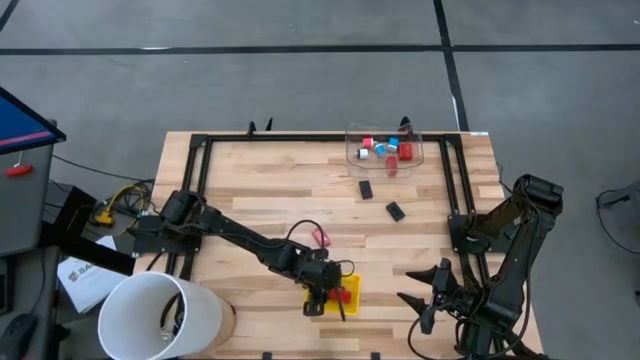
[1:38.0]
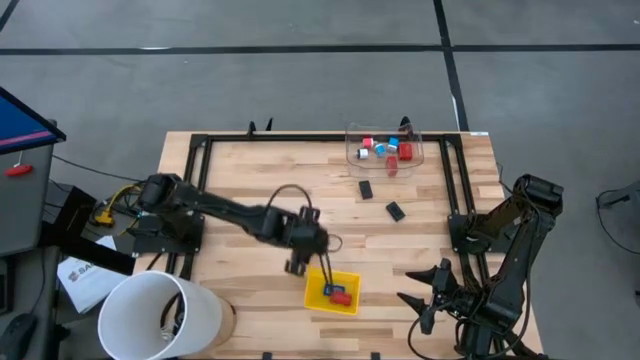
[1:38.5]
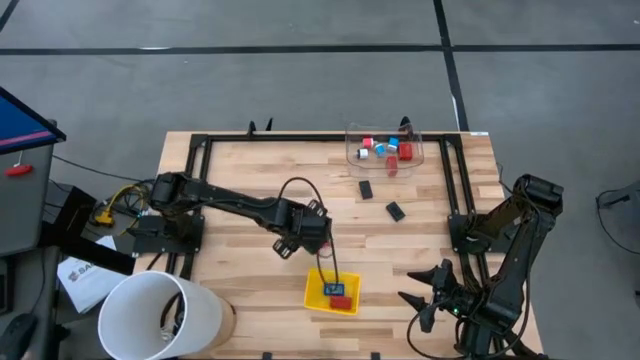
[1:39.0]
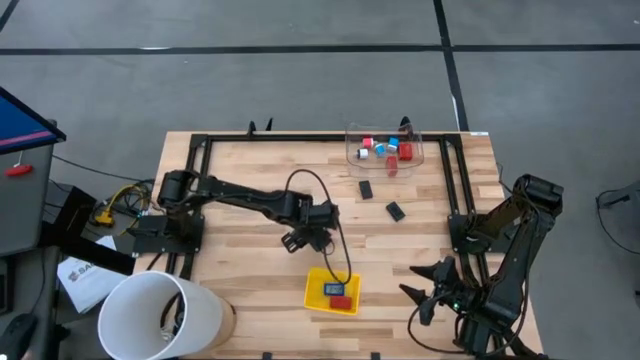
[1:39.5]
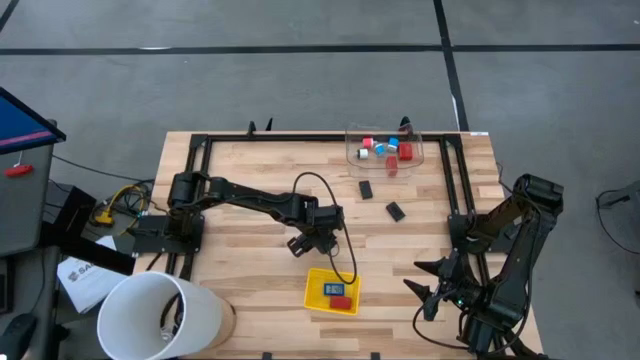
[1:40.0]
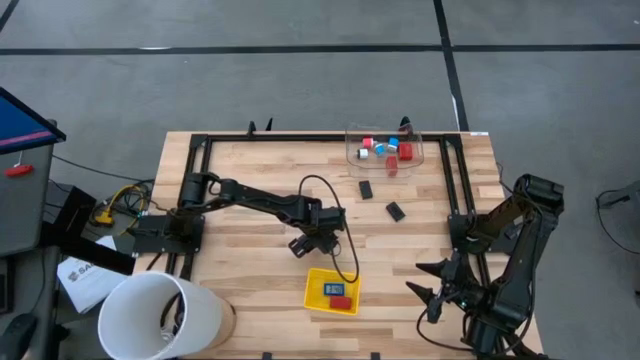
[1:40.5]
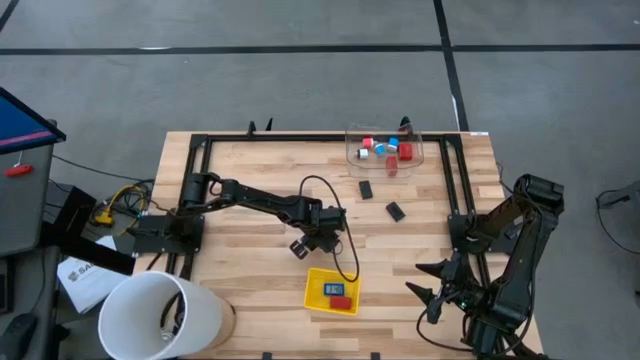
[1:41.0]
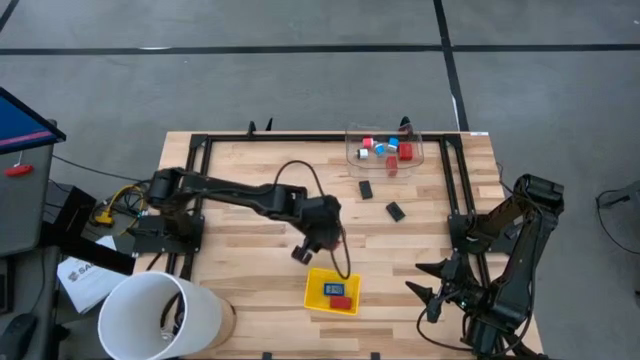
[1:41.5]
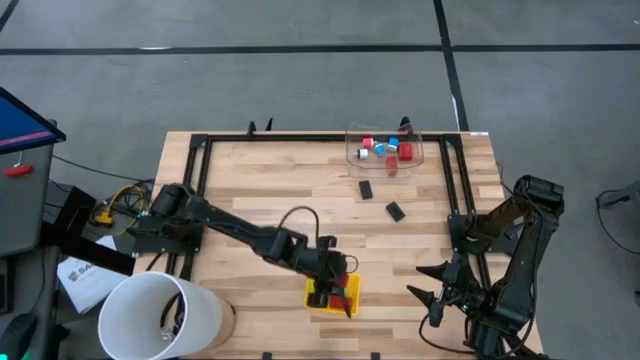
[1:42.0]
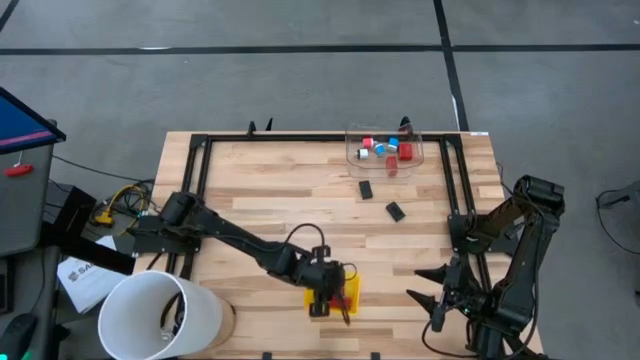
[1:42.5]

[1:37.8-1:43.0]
Task: Pick & Place Office items
Put the red digital clock into the yellow bin

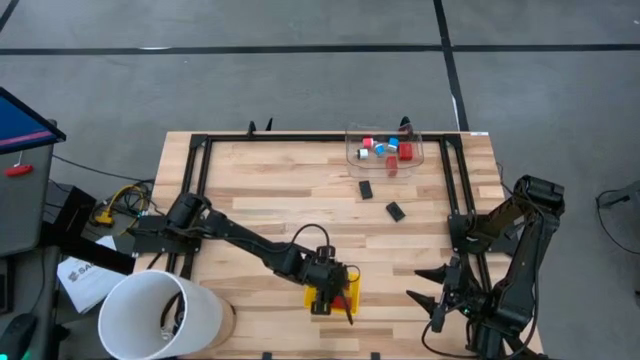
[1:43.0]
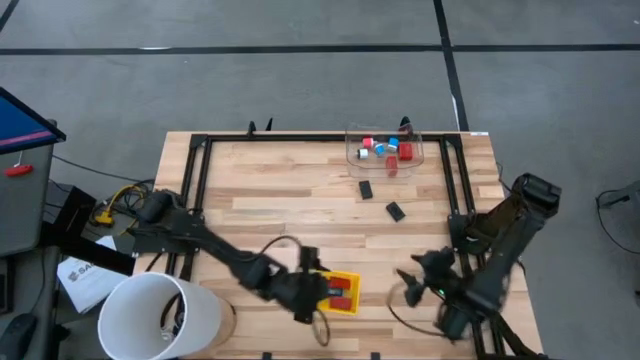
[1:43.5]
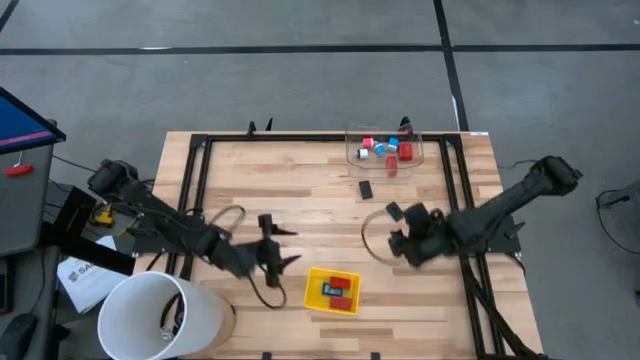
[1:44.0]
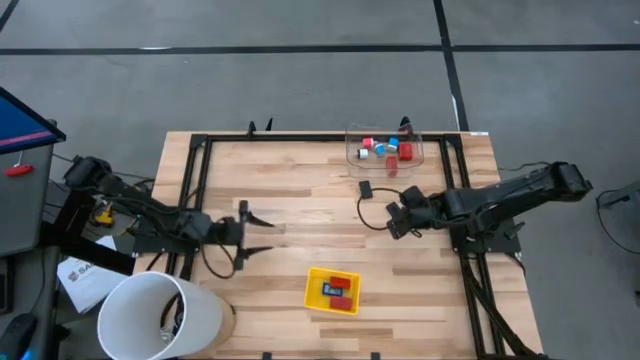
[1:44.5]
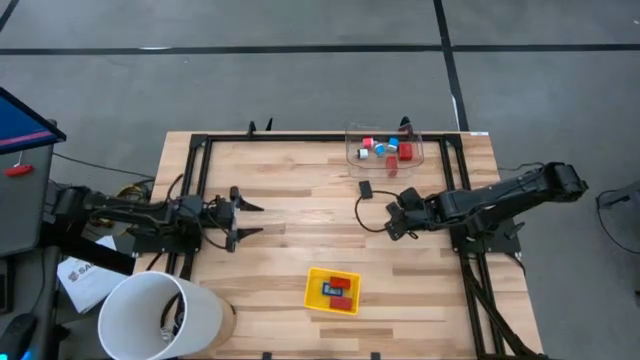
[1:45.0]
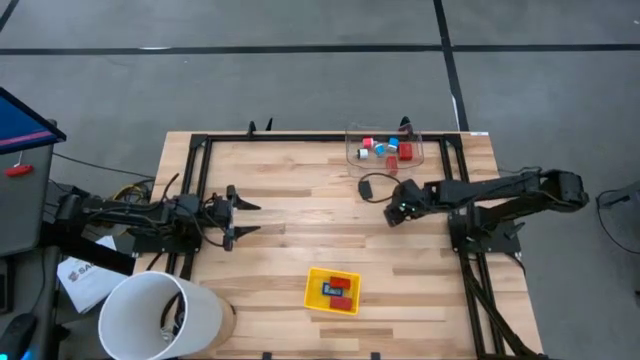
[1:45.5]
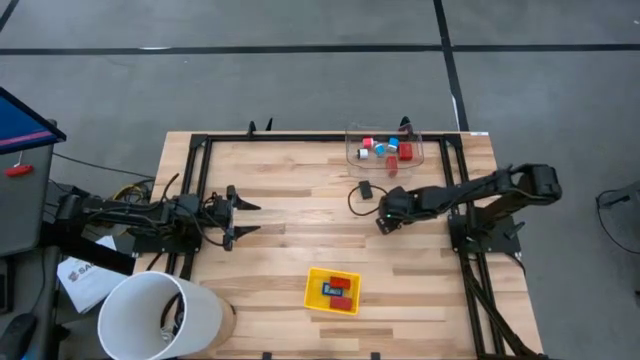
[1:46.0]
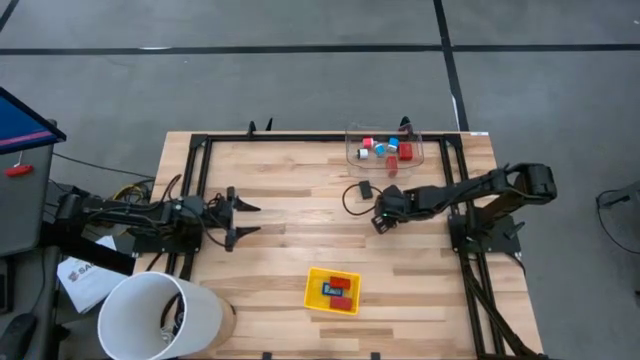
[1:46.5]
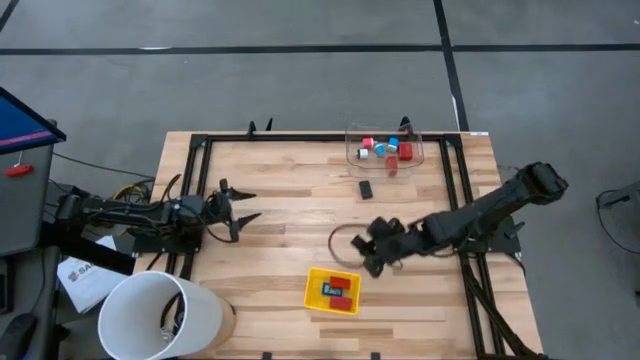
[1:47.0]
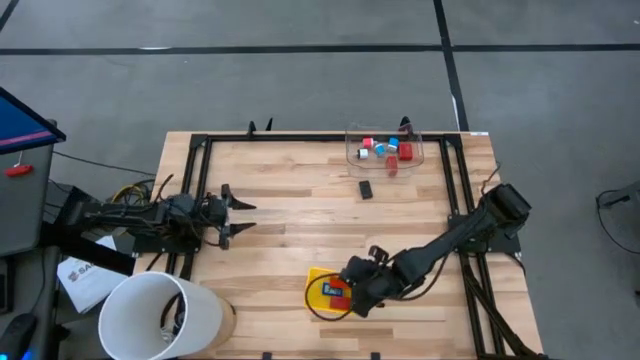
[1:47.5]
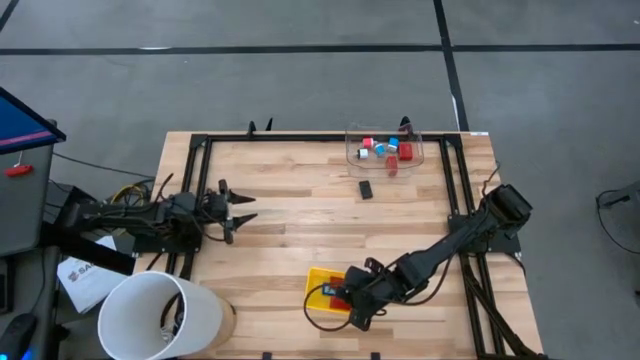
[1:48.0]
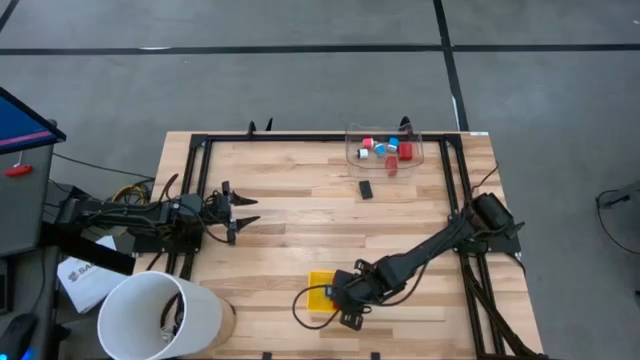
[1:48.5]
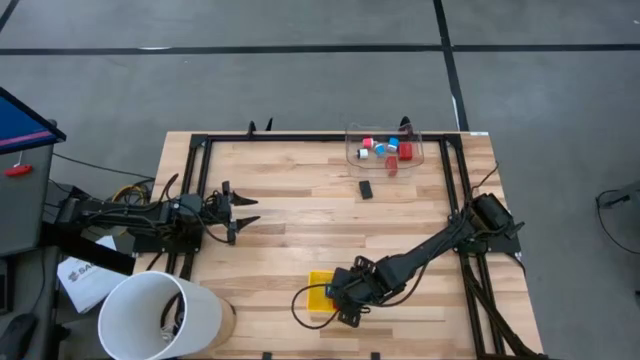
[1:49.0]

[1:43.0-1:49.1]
Put the bottom black digital clock into the yellow bin

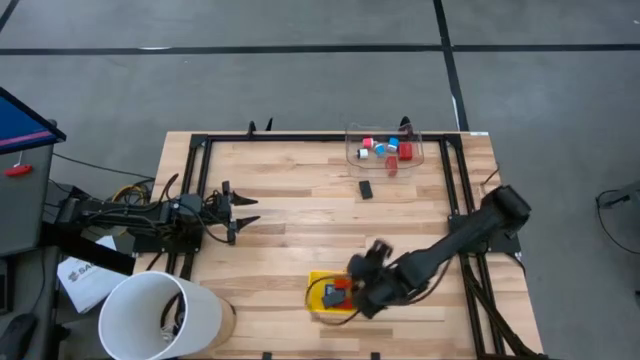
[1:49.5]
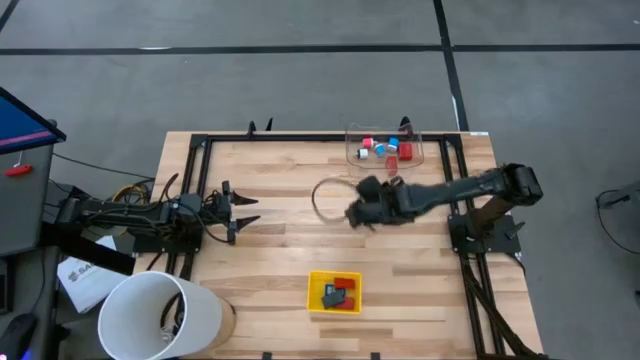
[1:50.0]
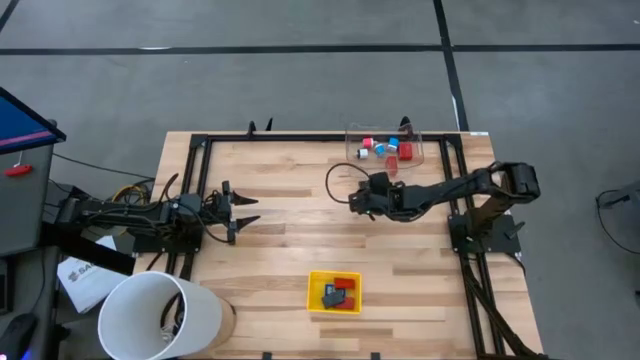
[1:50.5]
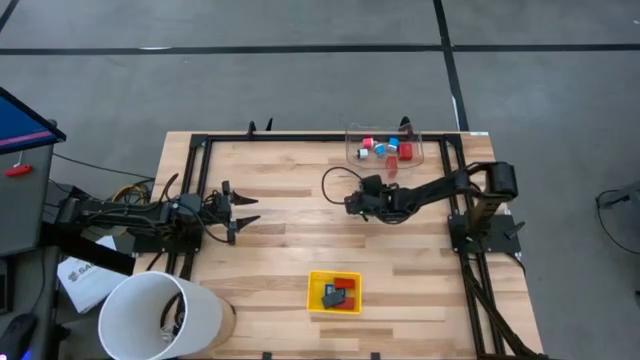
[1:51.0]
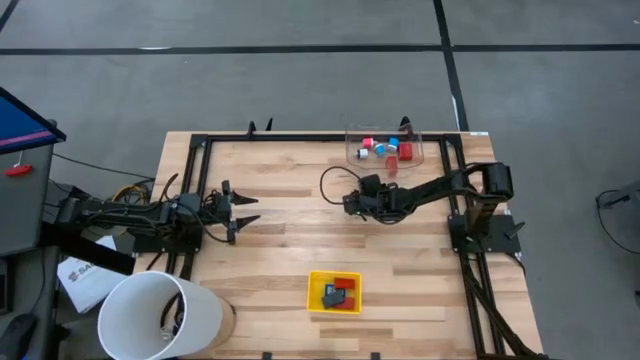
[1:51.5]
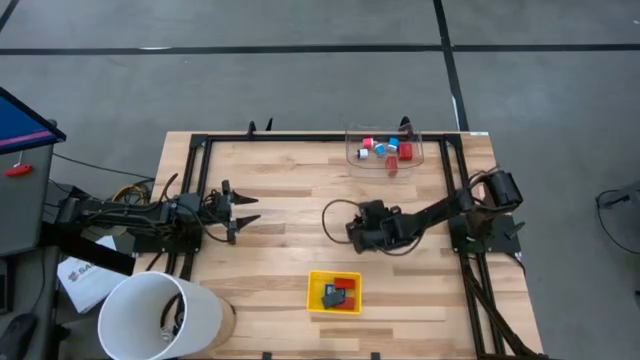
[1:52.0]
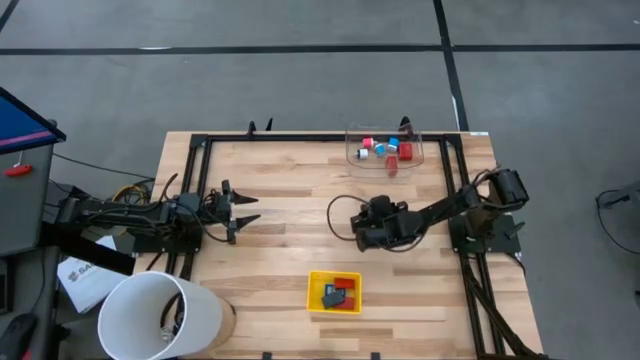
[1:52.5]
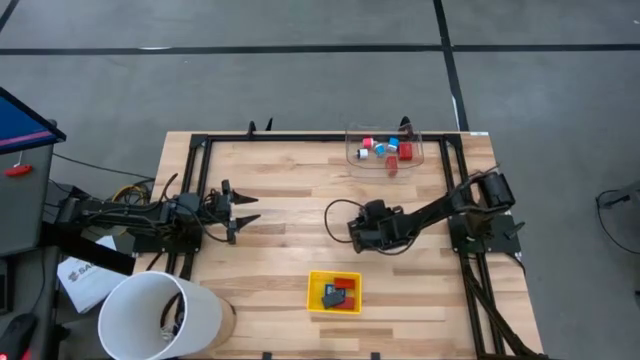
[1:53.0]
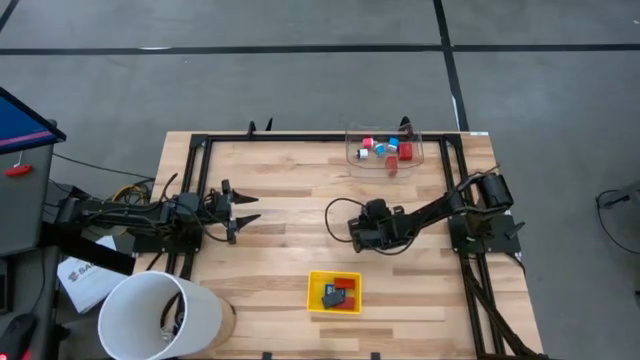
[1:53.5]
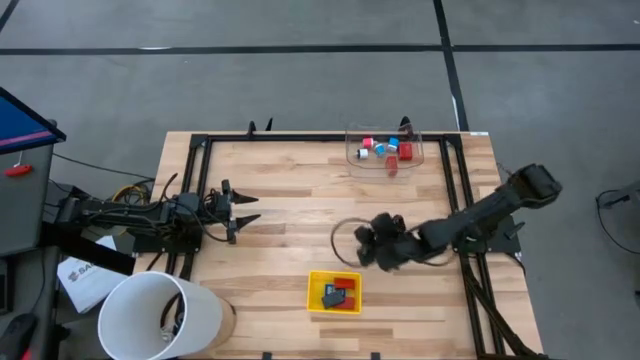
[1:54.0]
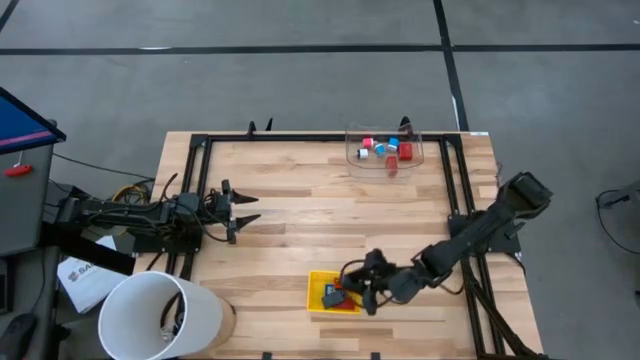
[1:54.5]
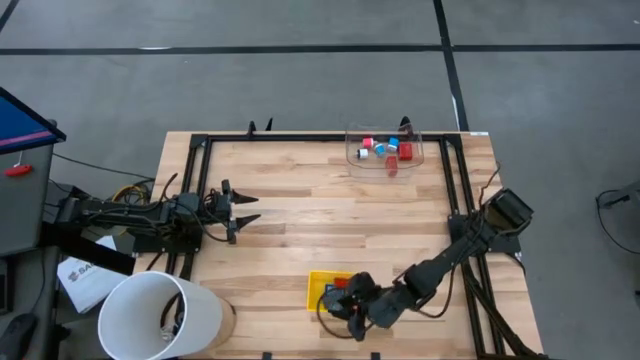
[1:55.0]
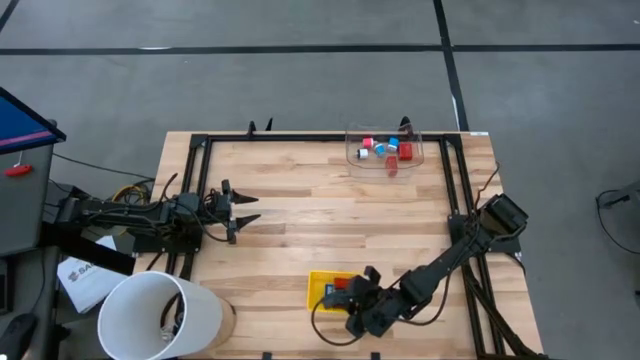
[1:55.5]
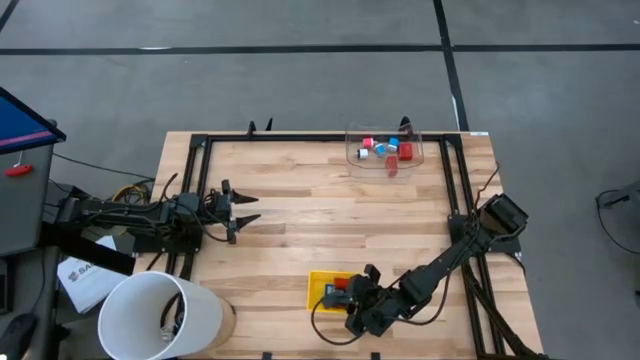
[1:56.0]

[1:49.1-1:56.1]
Put the black digital clock into the yellow bin

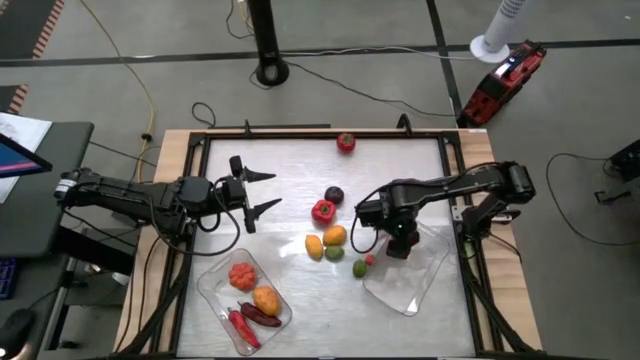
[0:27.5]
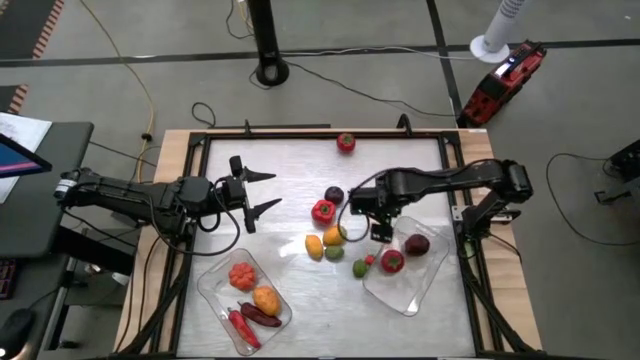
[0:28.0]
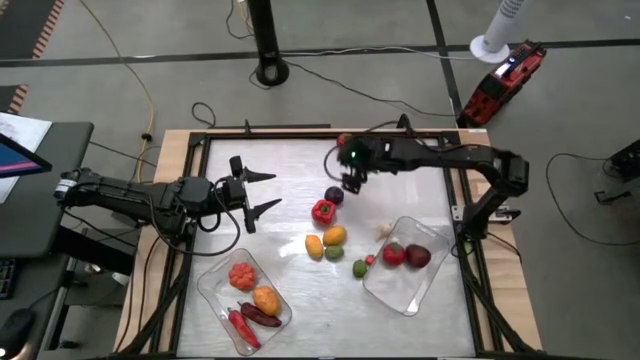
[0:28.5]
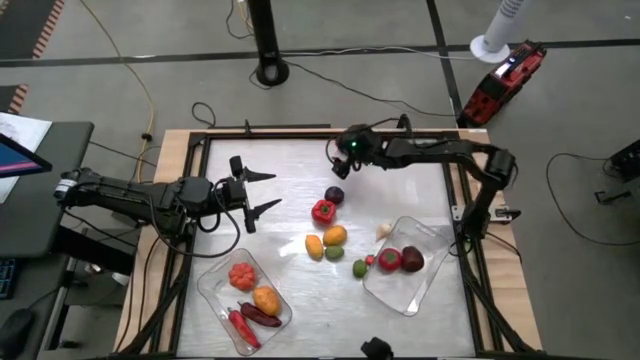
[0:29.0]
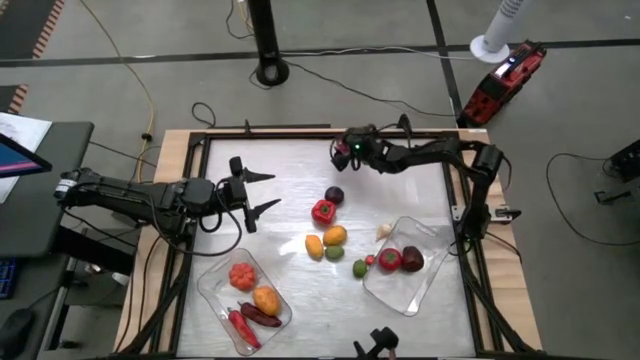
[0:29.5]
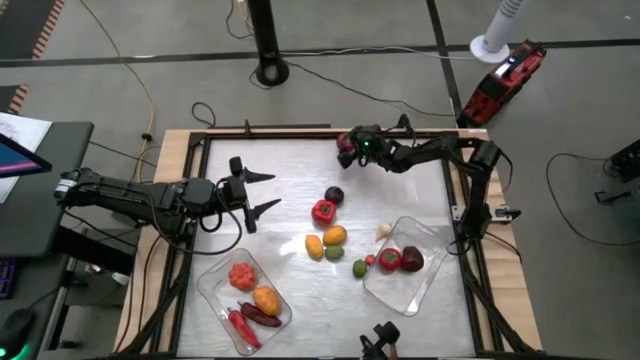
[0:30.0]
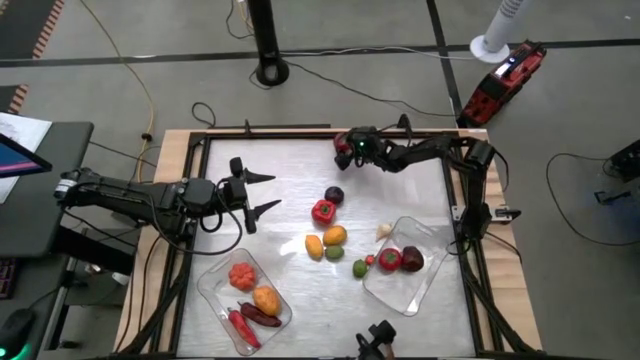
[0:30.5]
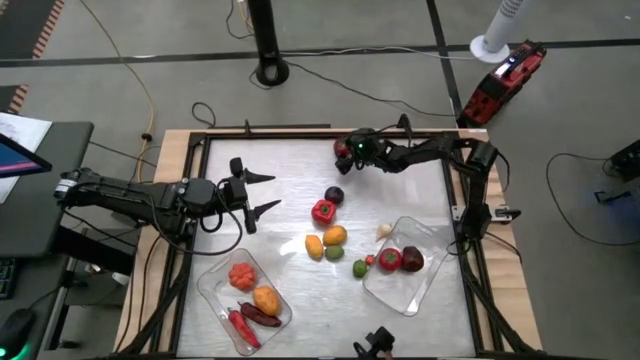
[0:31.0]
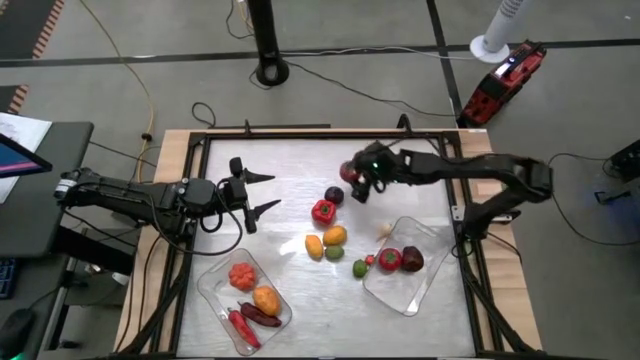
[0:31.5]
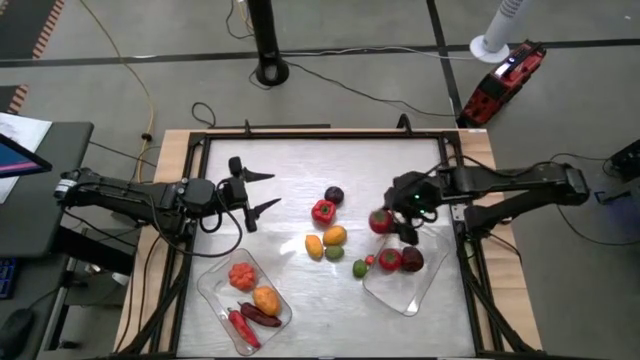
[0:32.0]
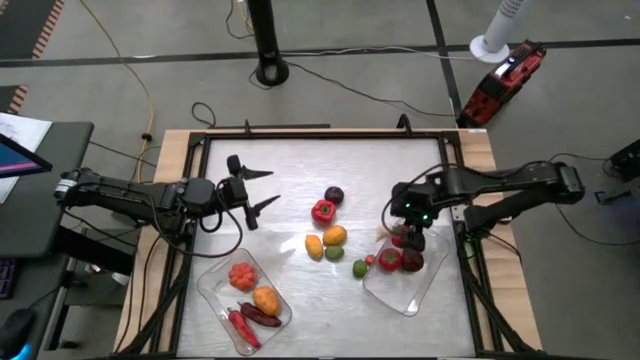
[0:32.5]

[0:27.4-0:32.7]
Task: Sort produce into baskets
Put the tomato into the right transparent bin
